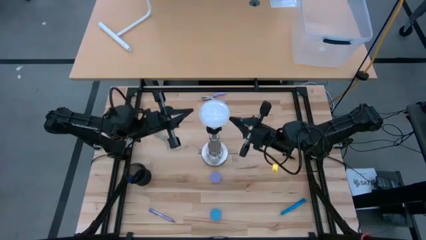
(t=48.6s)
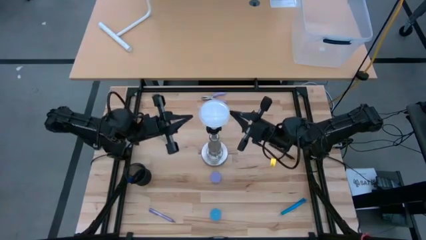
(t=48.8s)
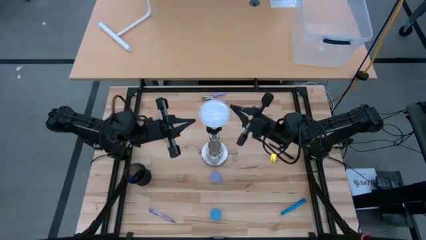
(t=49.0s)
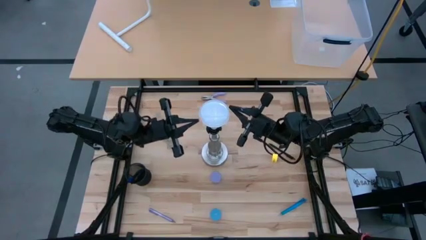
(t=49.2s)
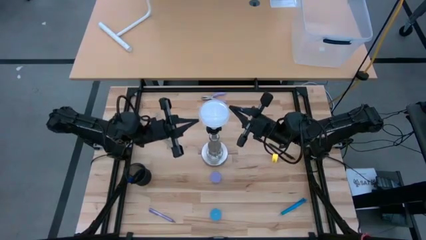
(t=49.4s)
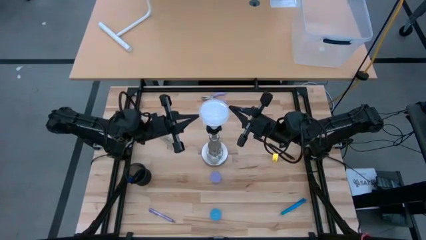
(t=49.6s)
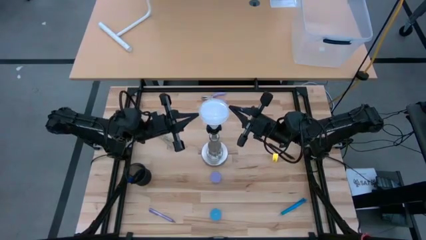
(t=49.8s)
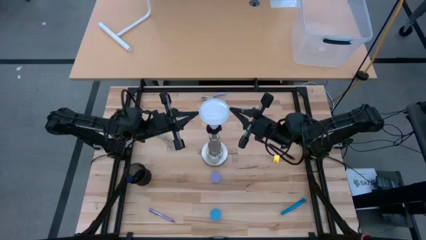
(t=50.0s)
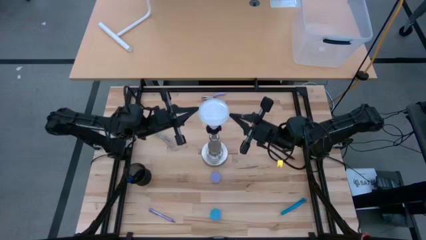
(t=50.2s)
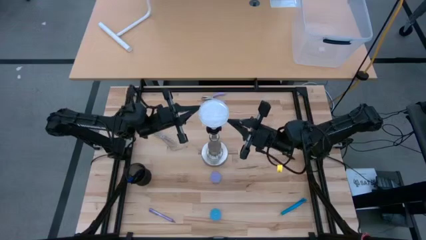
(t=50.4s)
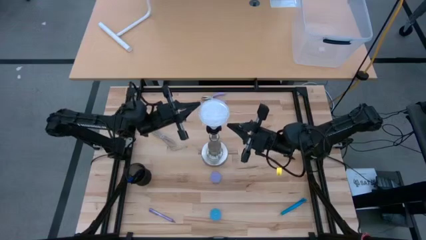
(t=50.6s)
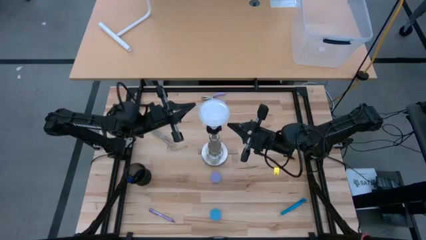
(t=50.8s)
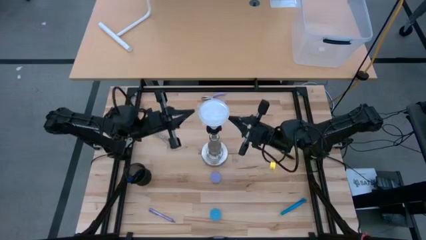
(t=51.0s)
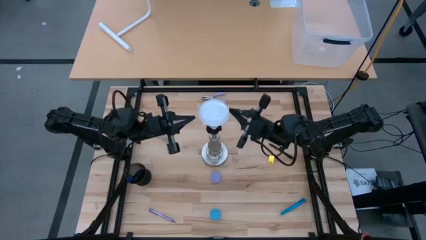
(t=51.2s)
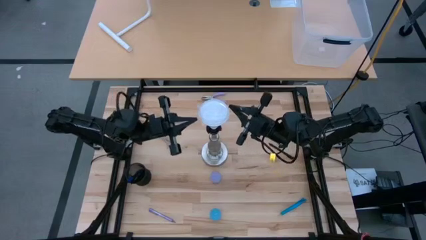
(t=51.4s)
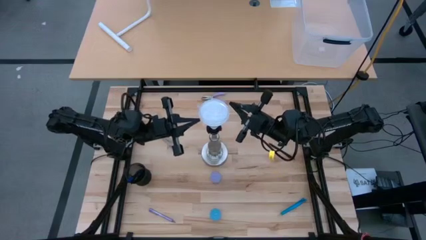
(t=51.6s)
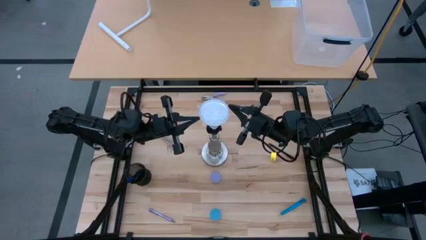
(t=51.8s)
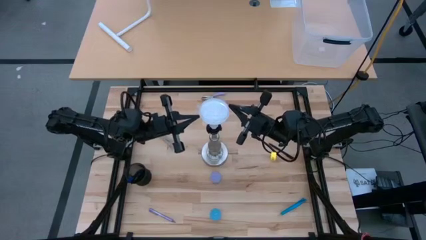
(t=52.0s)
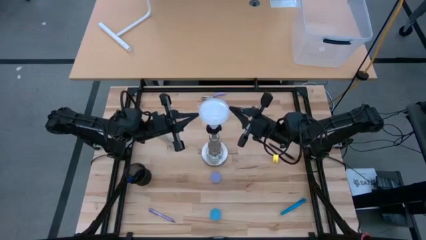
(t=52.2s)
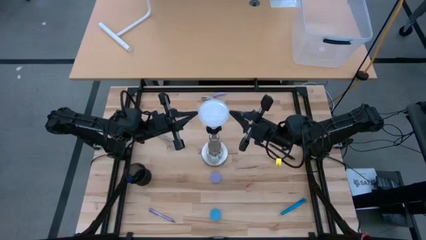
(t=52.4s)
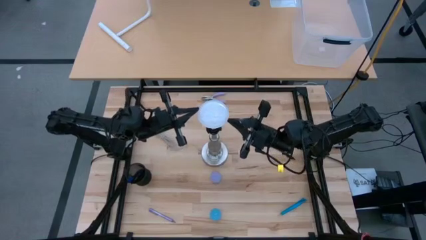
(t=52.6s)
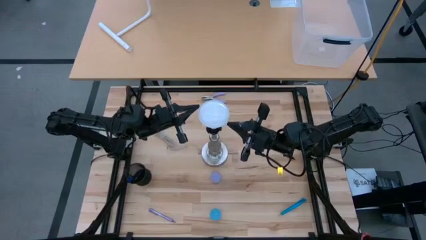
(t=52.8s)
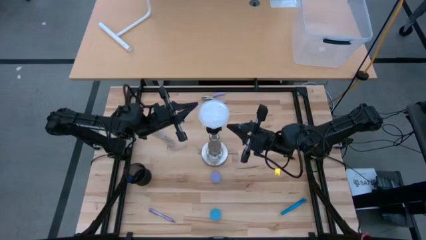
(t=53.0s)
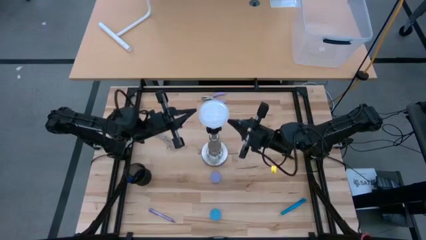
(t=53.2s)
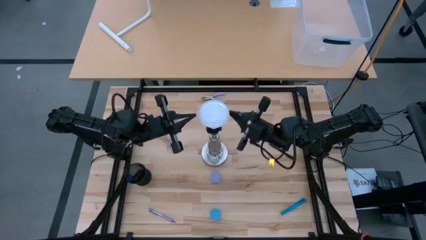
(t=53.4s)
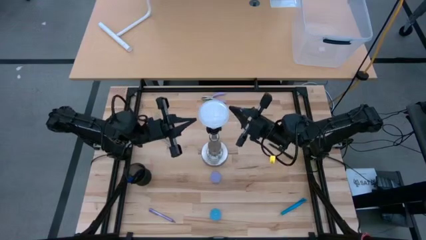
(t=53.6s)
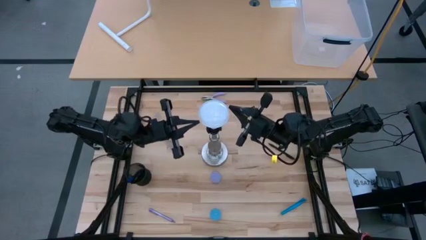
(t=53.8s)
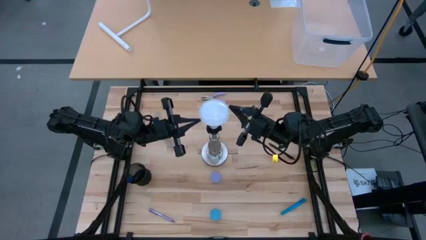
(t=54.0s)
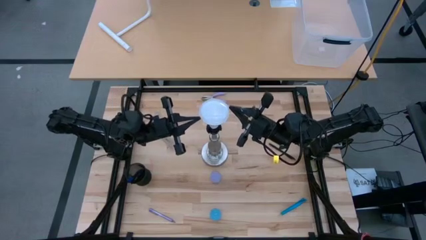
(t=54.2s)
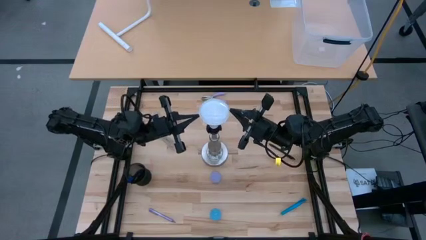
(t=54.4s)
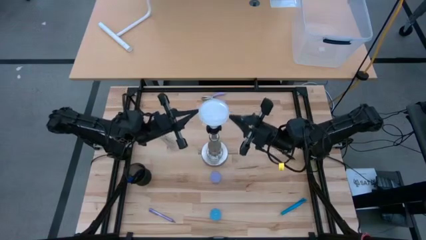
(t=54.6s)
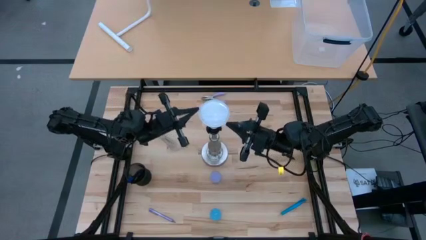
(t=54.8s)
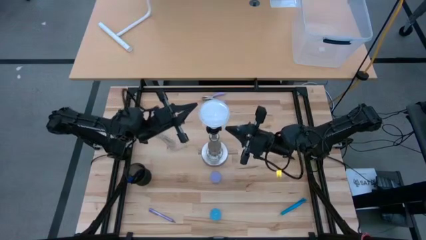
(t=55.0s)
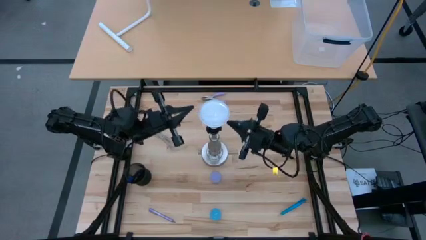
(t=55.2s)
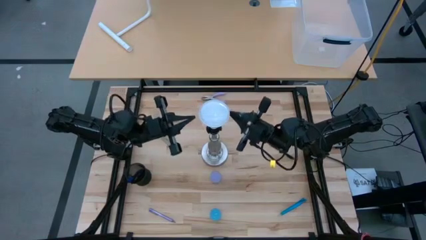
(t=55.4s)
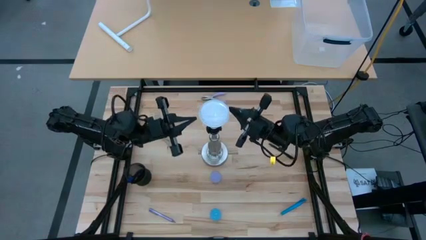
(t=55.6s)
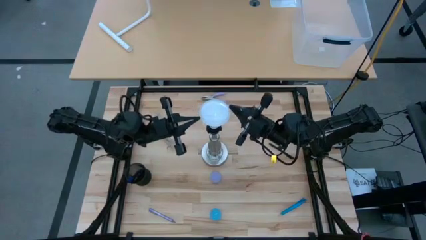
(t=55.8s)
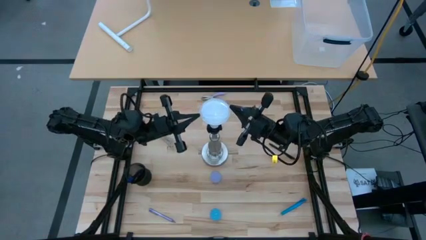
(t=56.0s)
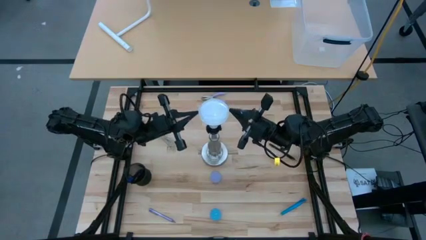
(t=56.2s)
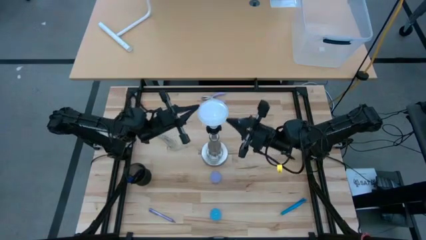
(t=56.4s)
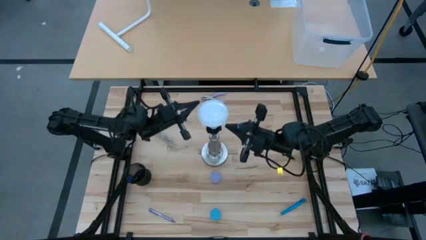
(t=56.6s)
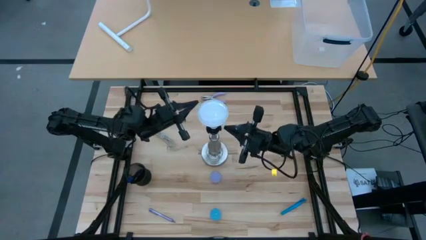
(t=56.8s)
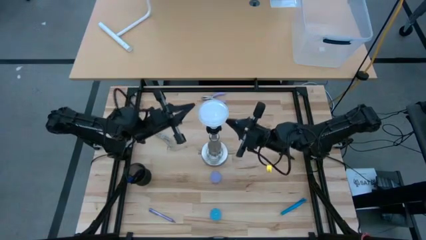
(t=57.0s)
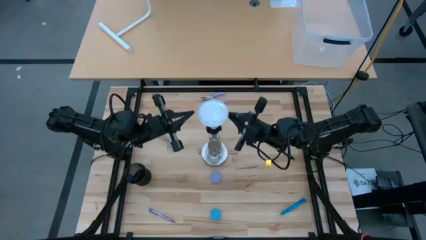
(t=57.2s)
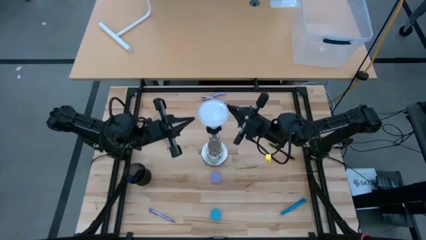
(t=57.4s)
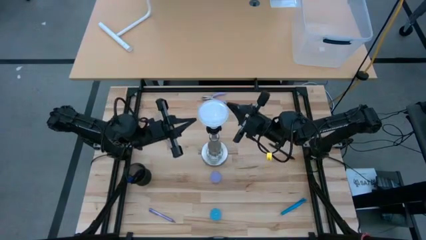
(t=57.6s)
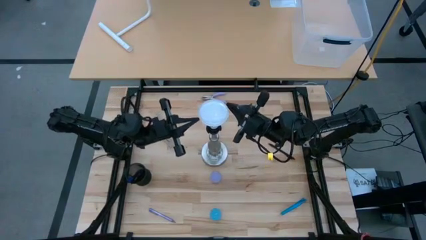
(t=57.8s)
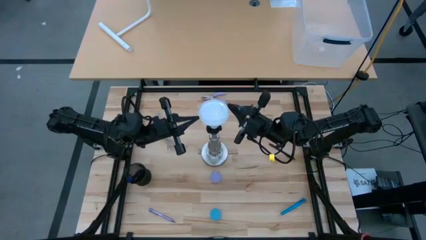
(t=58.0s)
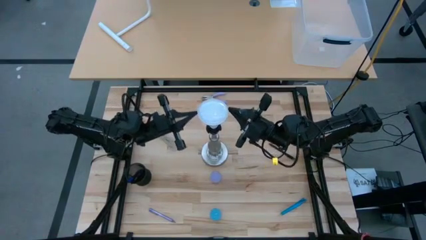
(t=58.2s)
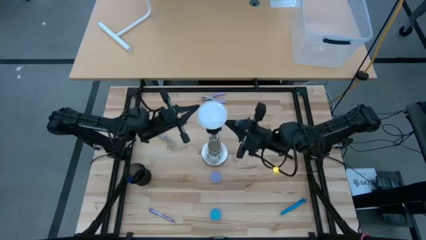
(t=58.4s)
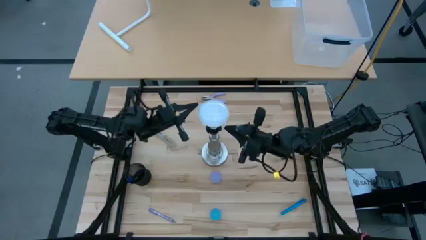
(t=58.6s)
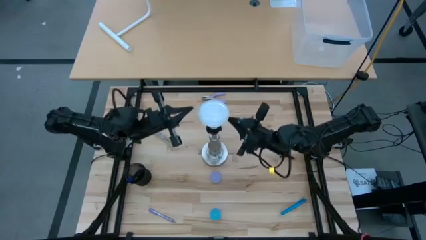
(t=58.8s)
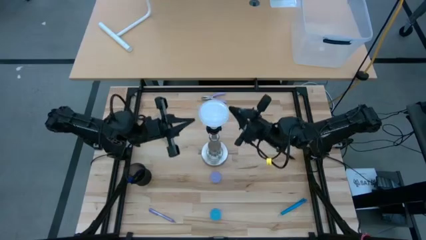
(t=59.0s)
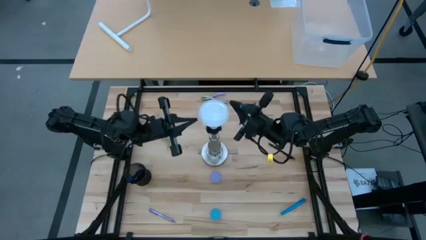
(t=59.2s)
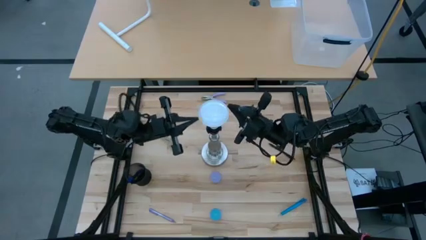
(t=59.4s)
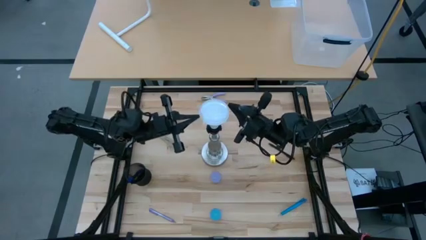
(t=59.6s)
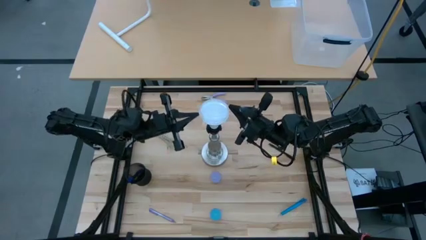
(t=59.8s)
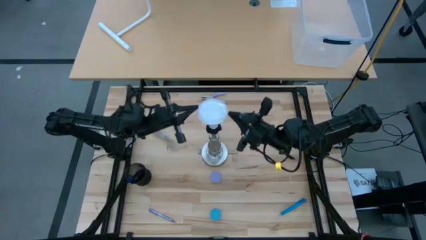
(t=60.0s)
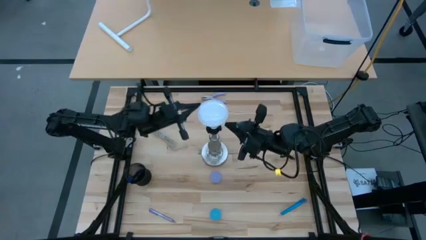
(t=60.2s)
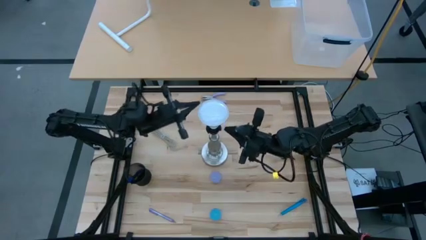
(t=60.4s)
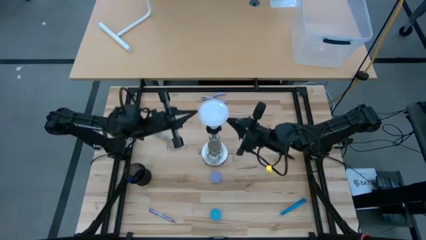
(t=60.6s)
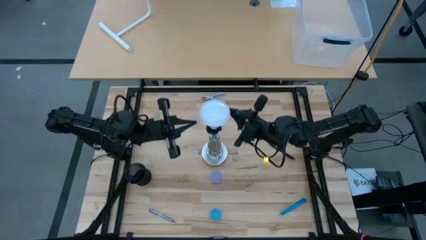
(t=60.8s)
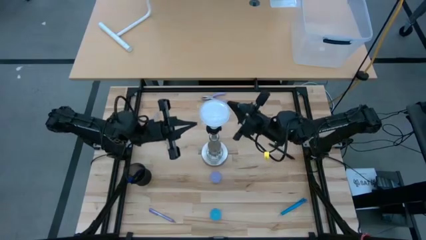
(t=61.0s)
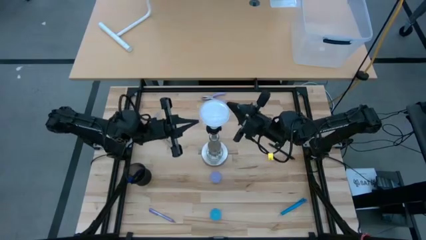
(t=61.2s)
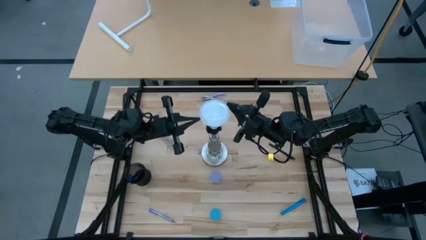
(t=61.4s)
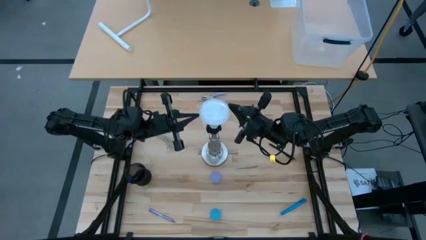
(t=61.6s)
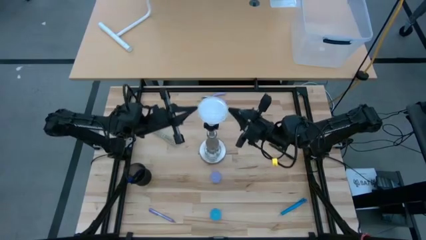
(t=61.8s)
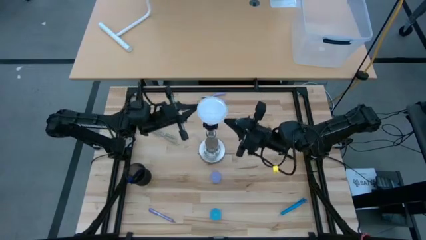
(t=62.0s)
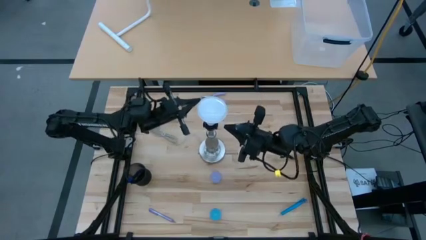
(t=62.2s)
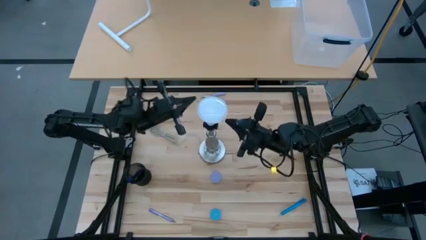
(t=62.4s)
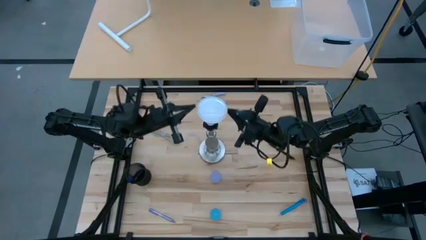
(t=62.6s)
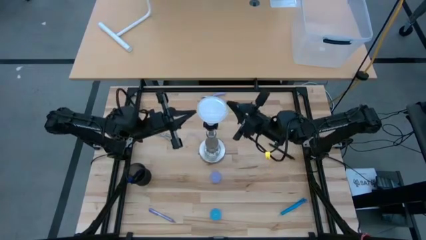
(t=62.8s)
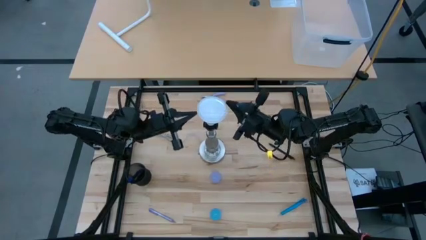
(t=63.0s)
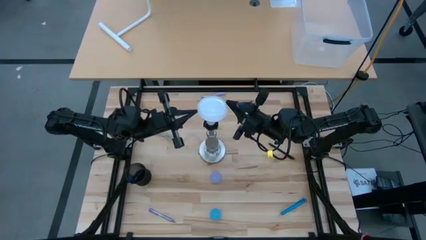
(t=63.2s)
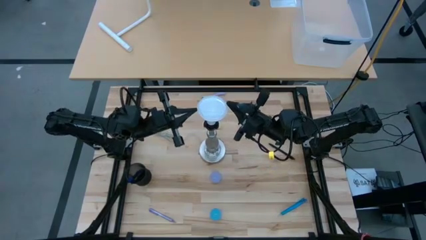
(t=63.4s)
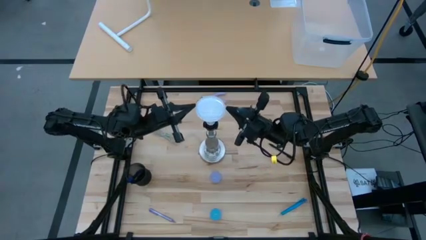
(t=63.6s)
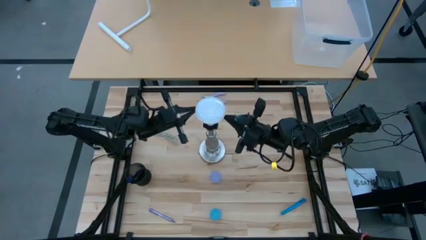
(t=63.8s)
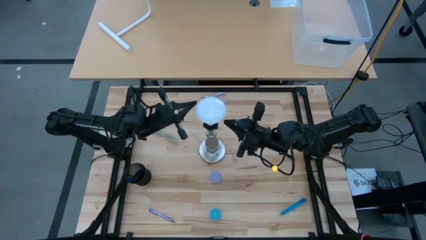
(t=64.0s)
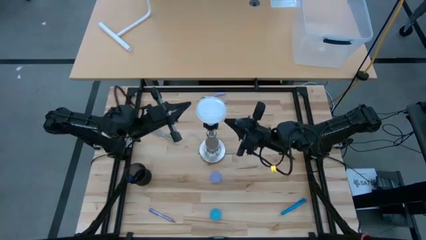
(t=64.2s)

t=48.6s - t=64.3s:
Task: Screw lightbulb
Insert the lightbulb into the silver lamp socket
